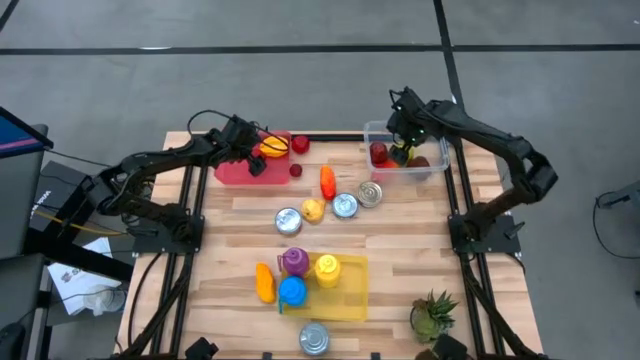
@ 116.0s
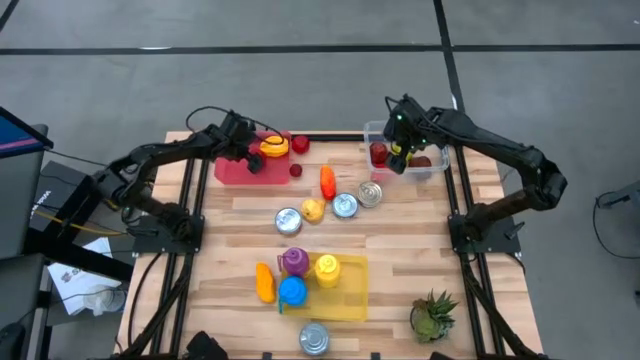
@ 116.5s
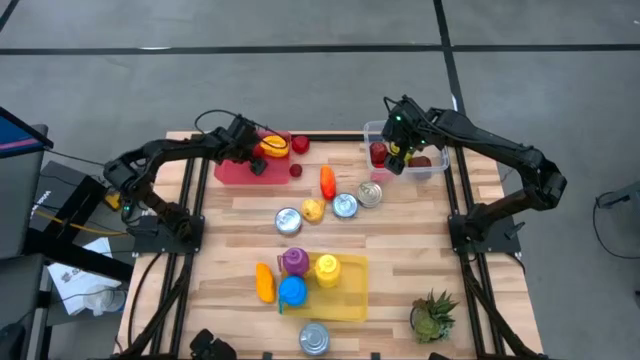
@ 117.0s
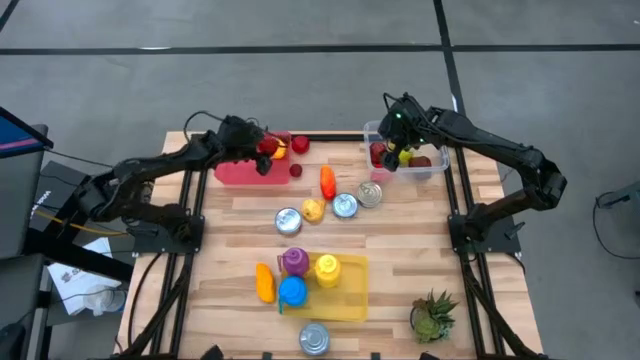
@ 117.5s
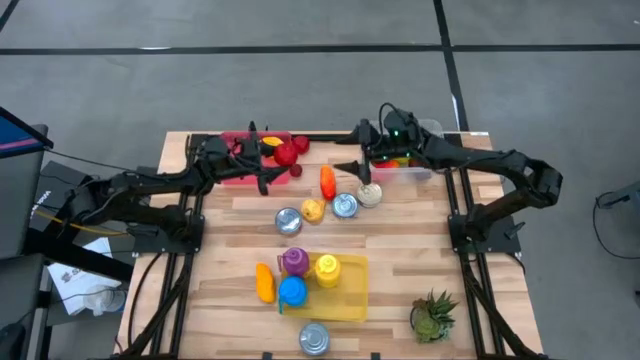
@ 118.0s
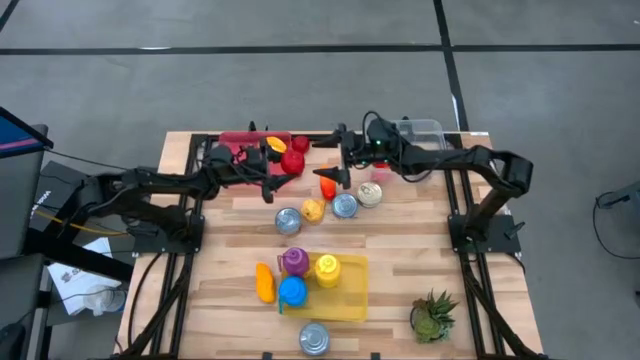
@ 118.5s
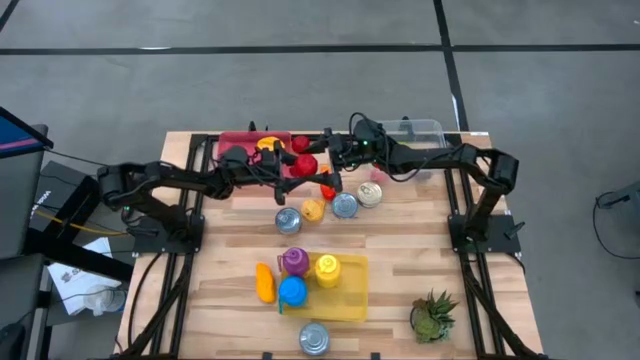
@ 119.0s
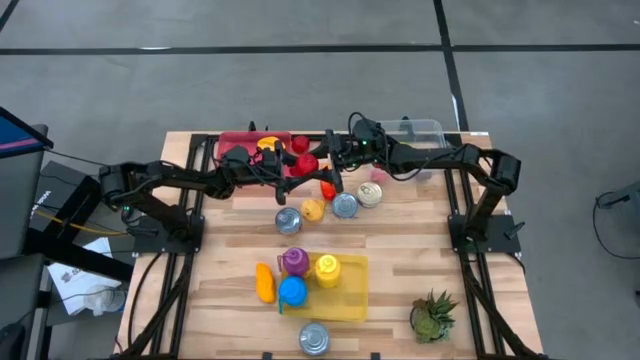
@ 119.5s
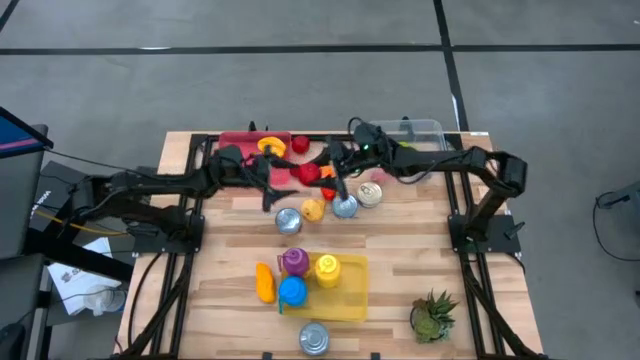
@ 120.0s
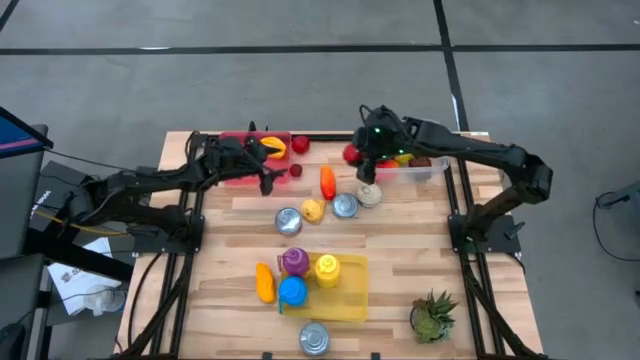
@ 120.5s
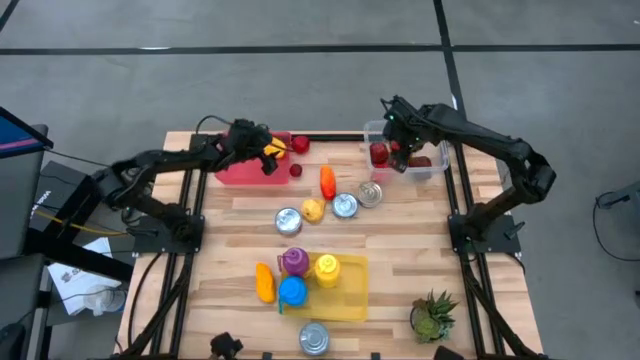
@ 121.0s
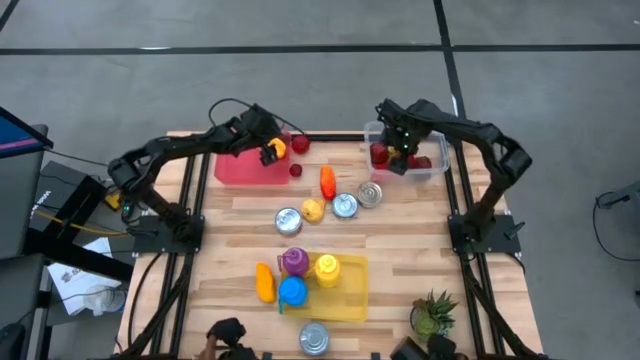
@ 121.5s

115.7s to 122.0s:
Task: Pick & Place Food Item
Put the red apple from the red bin into the transparent bin

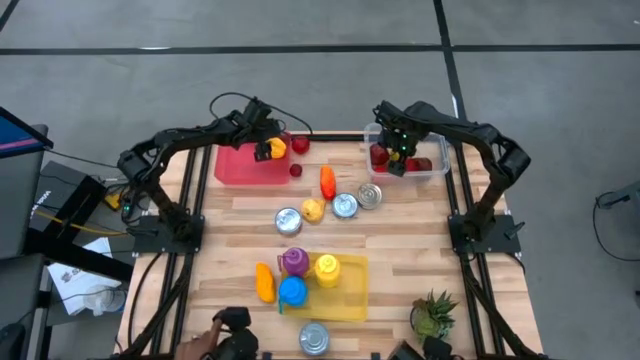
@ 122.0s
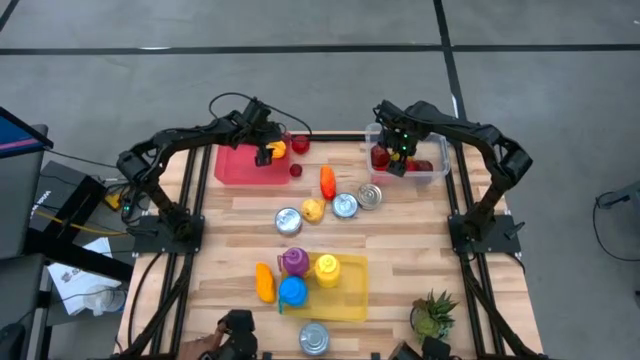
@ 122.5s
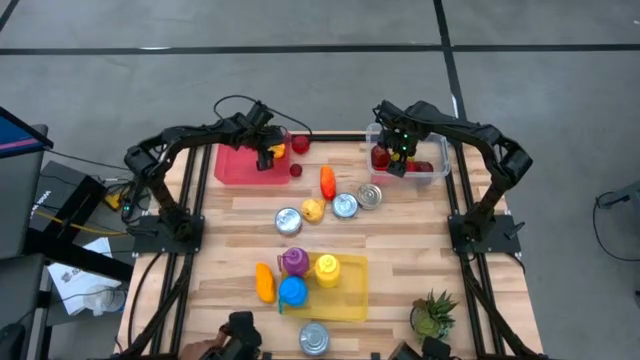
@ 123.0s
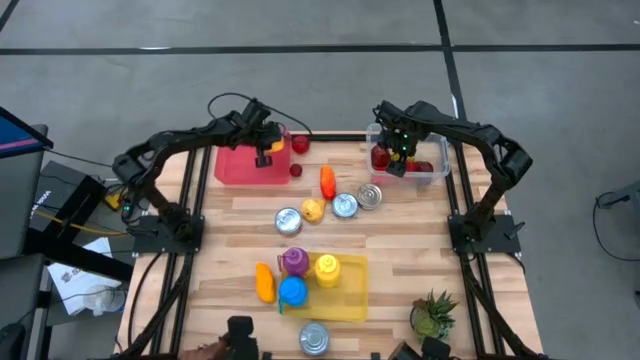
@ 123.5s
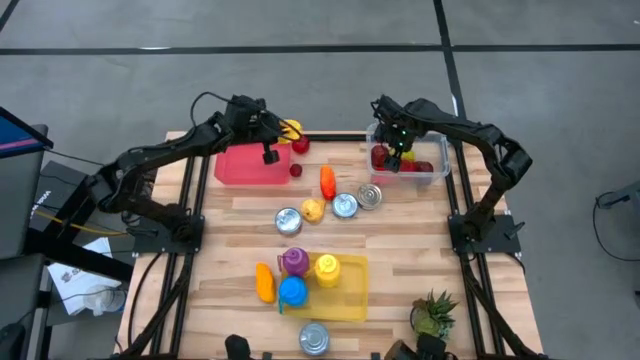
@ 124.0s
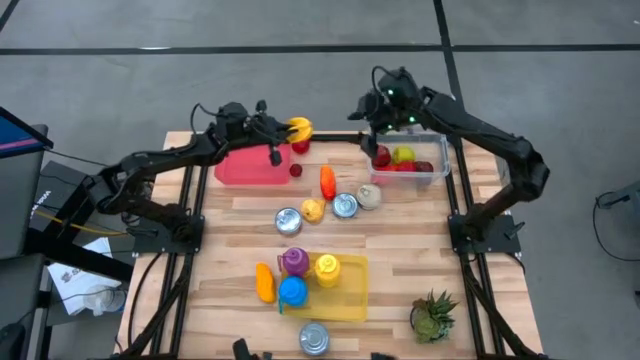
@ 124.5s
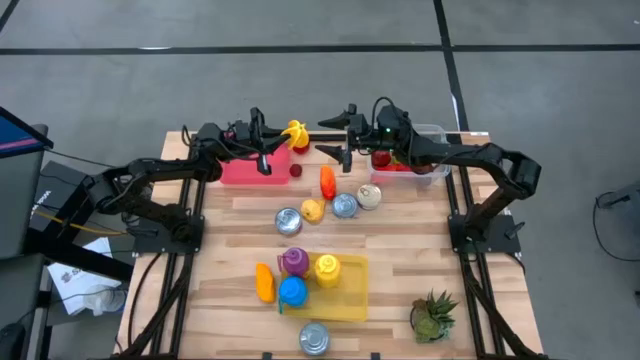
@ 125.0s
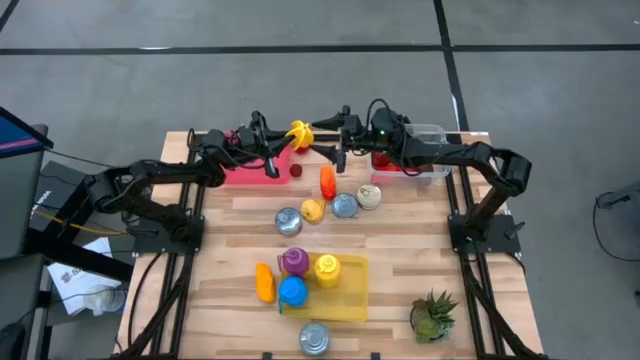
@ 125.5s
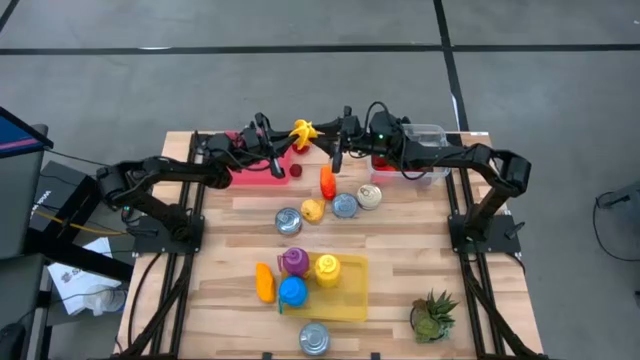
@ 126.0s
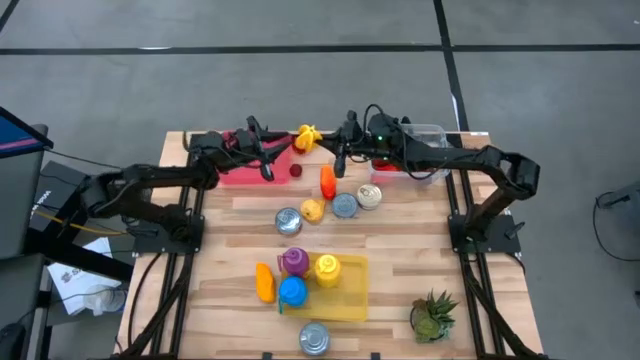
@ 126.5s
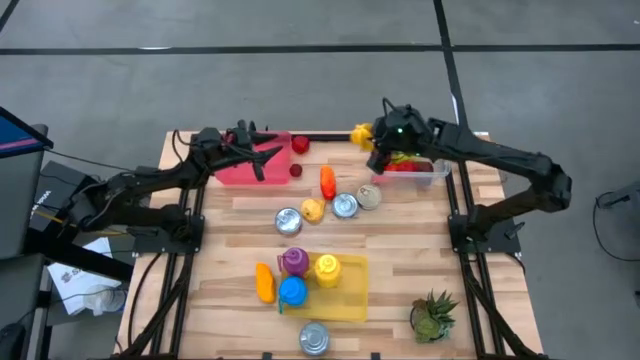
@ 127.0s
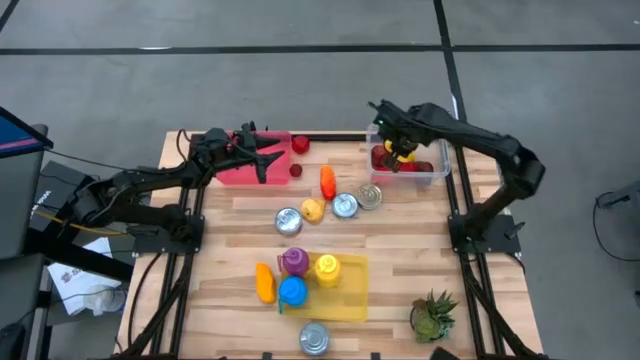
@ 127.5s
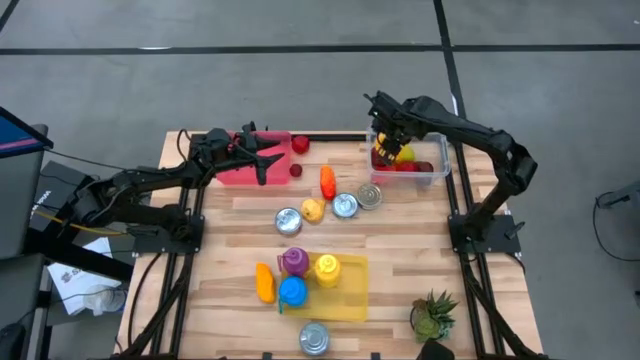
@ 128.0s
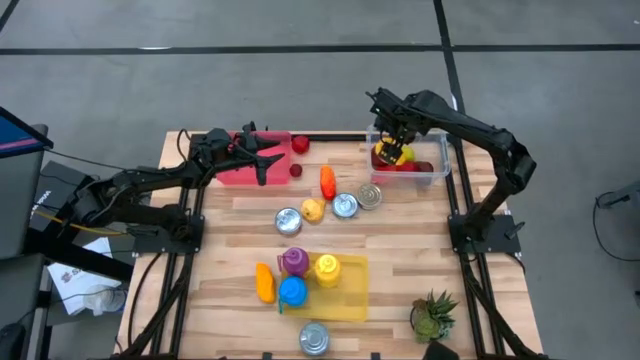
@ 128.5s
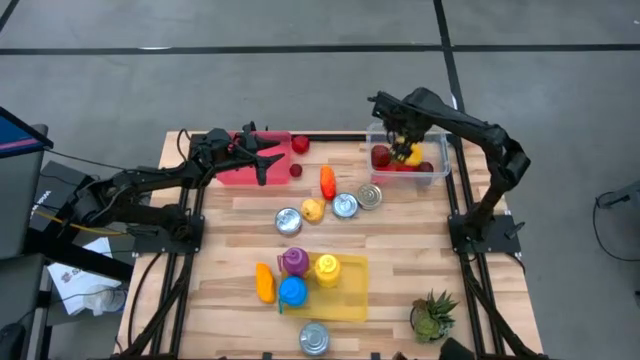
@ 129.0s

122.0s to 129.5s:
Put the starfruit from the red bin into the transparent bin

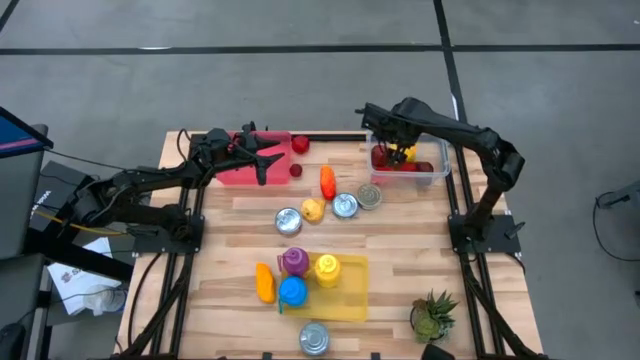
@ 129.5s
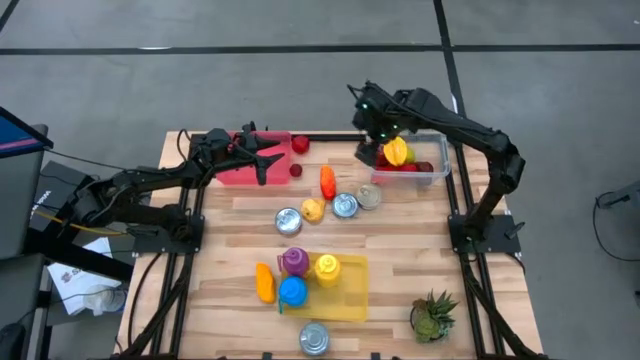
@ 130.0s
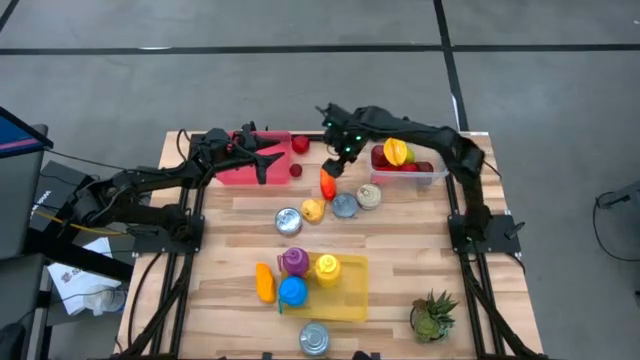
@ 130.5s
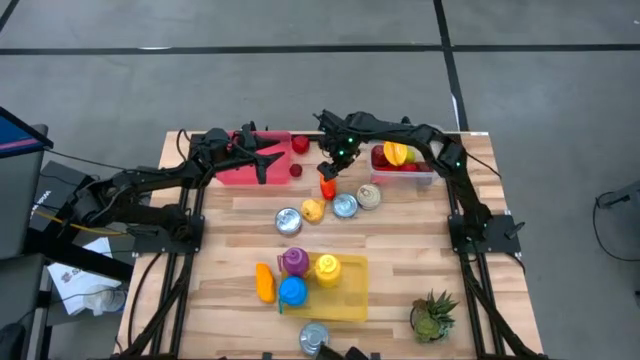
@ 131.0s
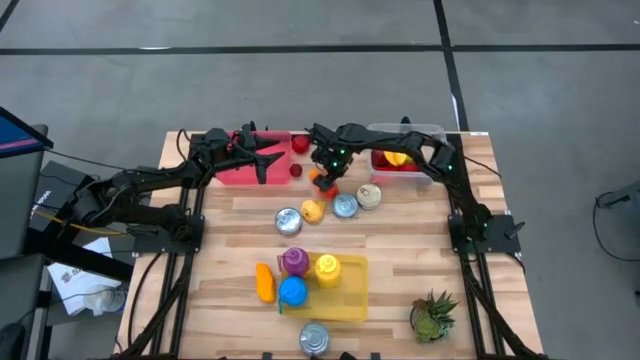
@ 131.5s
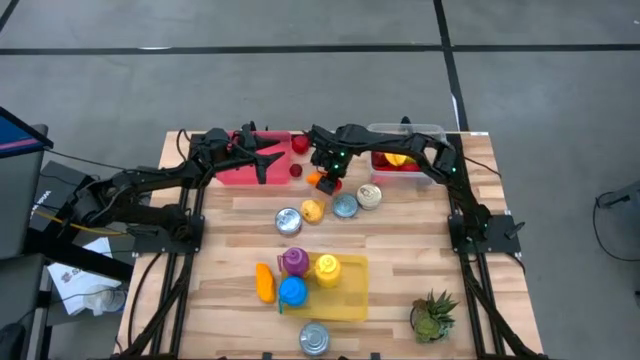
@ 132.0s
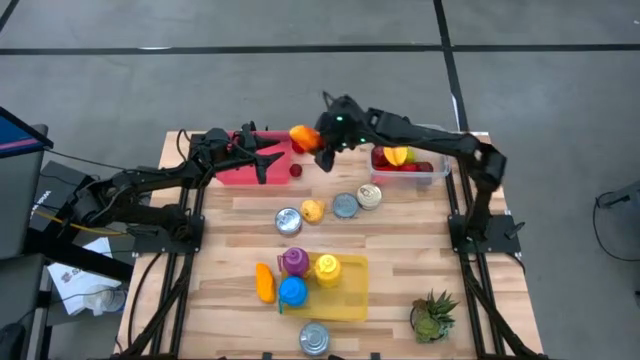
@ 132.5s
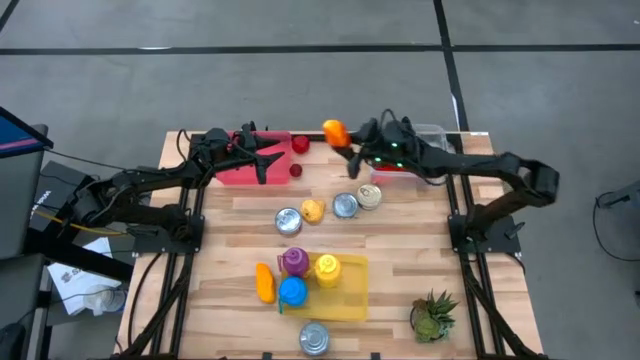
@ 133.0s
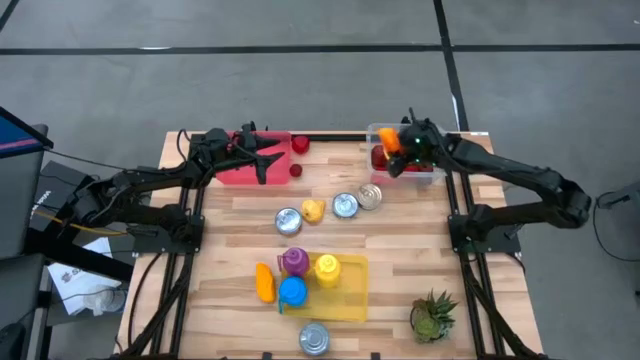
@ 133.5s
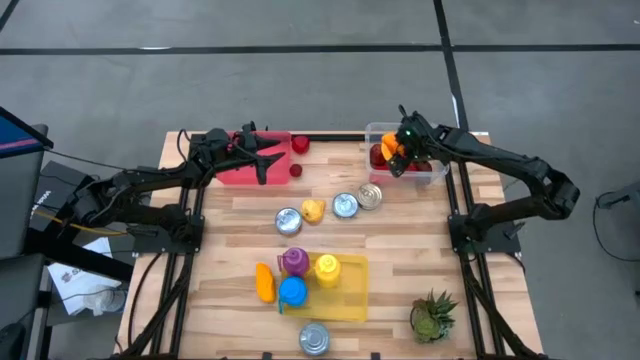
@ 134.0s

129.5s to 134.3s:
Put the top mango into the transparent bin

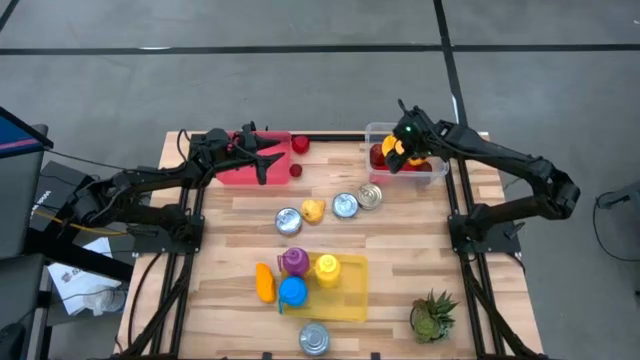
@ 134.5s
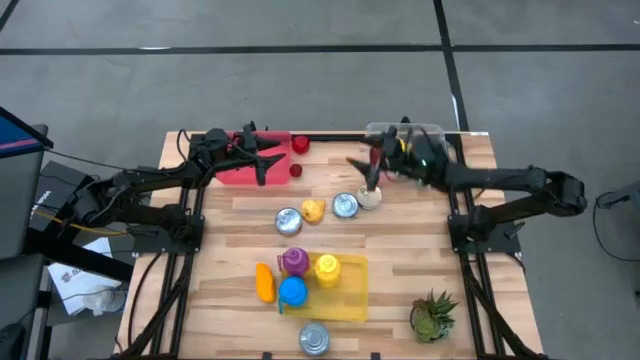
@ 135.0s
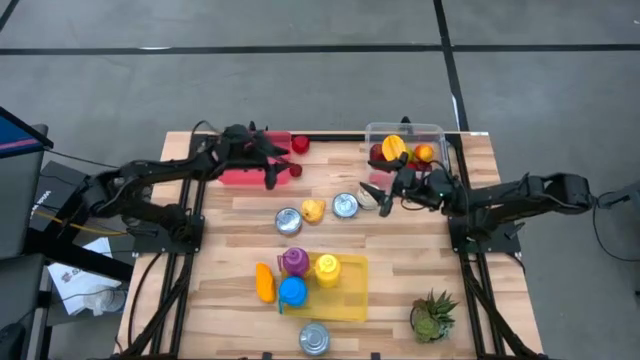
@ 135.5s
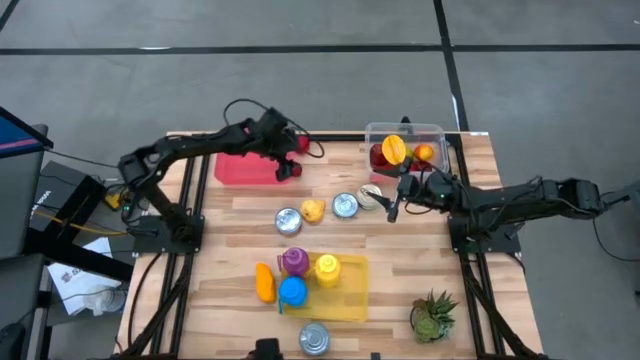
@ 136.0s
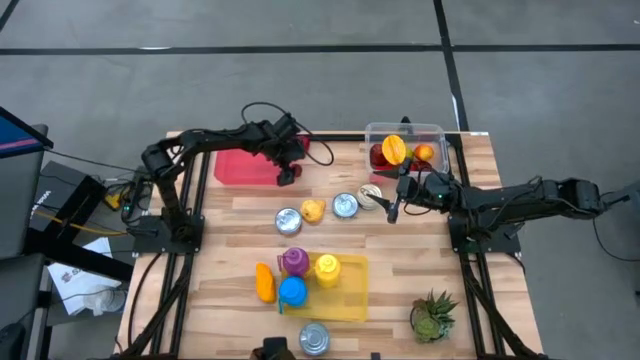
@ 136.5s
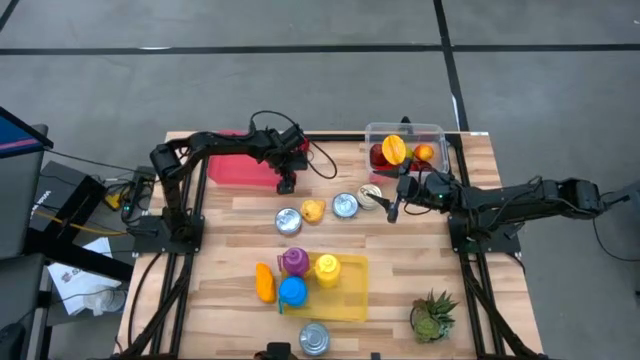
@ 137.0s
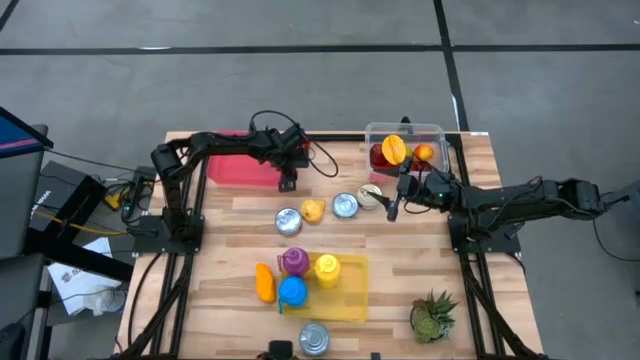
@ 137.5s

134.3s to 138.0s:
Put the pomegranate into the transparent bin
